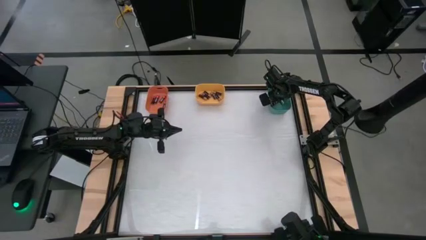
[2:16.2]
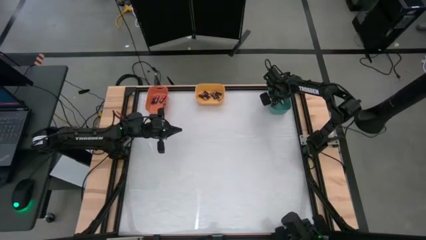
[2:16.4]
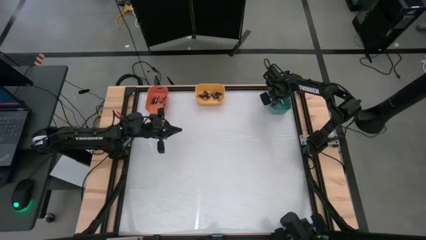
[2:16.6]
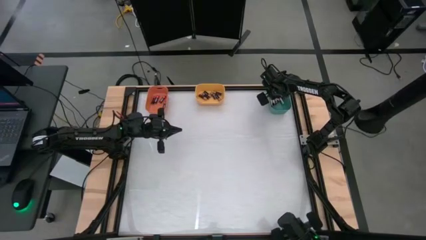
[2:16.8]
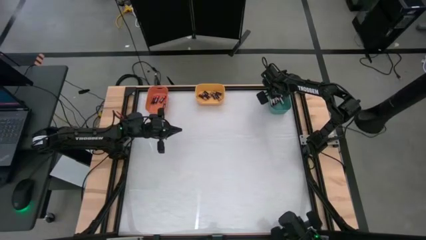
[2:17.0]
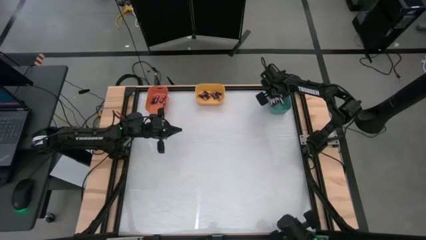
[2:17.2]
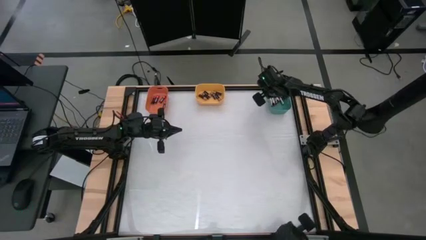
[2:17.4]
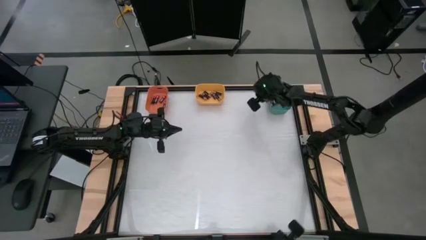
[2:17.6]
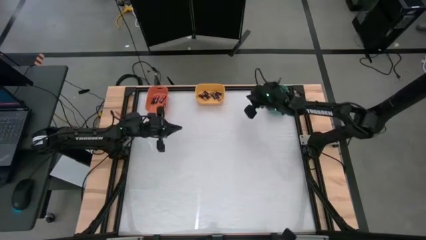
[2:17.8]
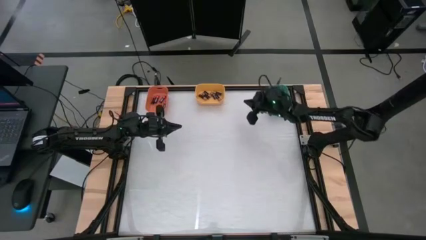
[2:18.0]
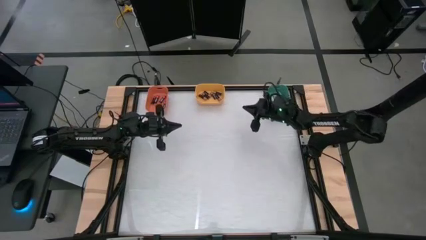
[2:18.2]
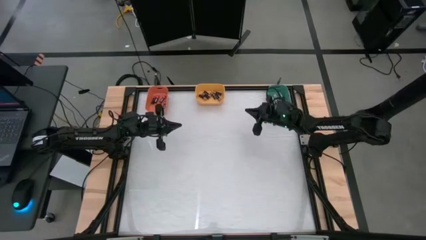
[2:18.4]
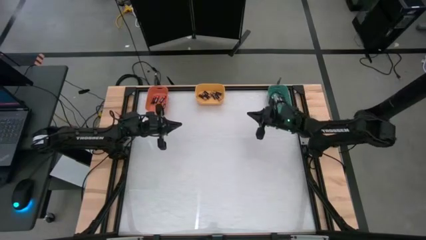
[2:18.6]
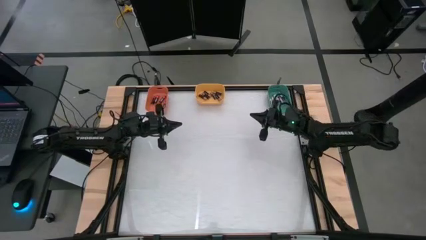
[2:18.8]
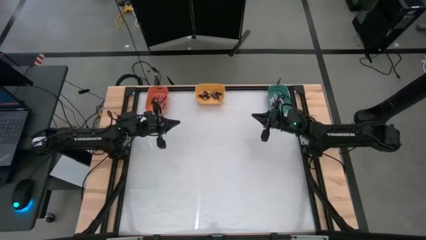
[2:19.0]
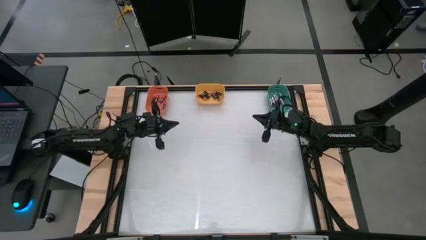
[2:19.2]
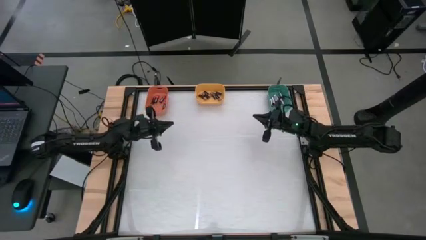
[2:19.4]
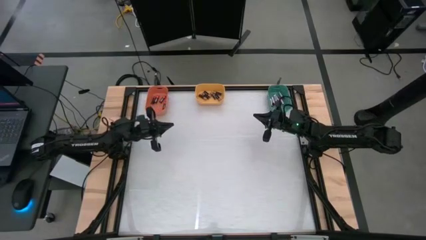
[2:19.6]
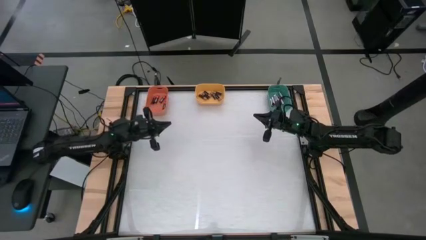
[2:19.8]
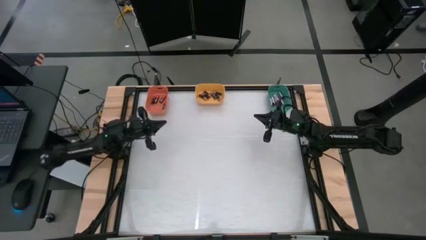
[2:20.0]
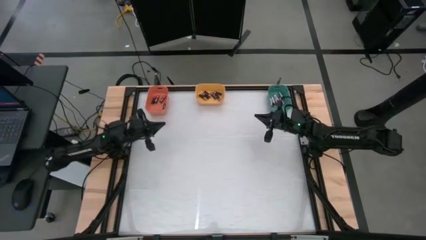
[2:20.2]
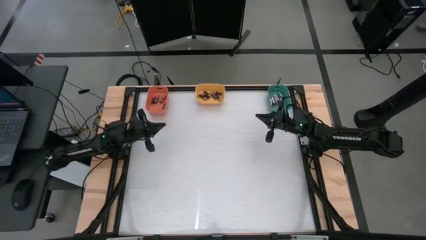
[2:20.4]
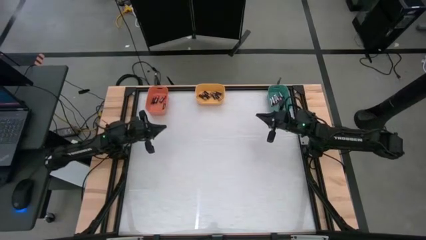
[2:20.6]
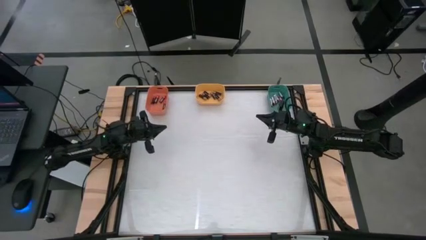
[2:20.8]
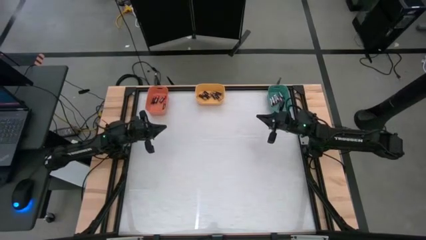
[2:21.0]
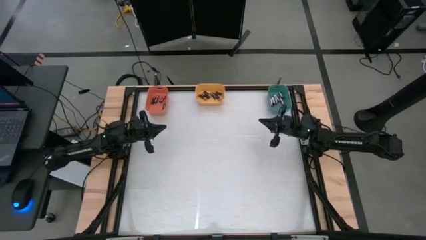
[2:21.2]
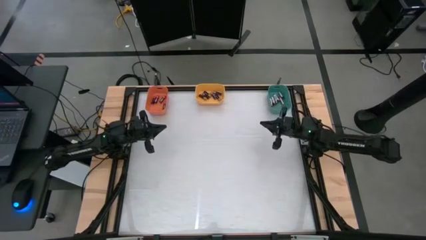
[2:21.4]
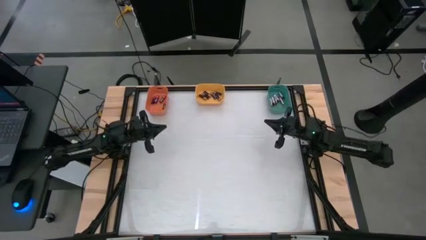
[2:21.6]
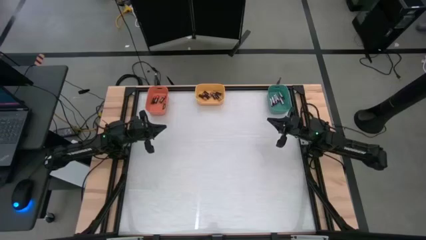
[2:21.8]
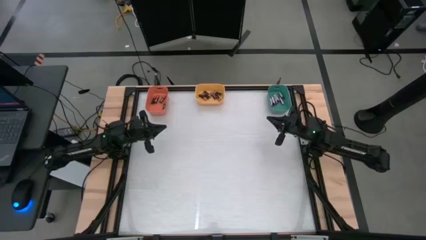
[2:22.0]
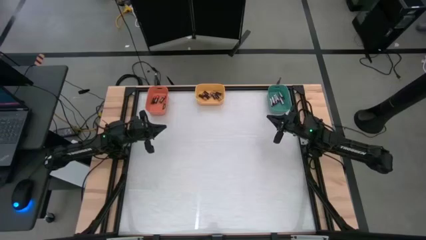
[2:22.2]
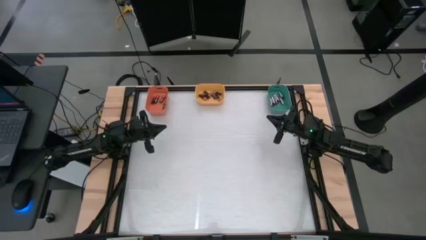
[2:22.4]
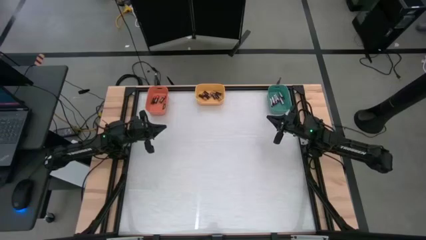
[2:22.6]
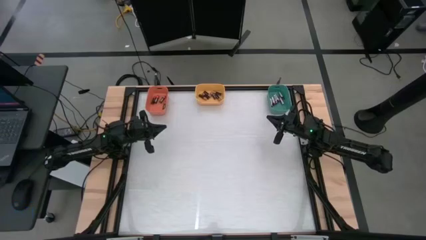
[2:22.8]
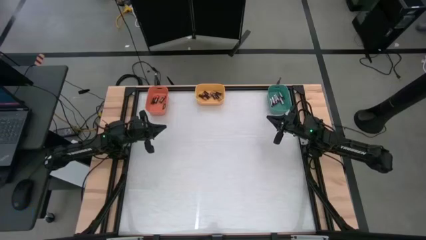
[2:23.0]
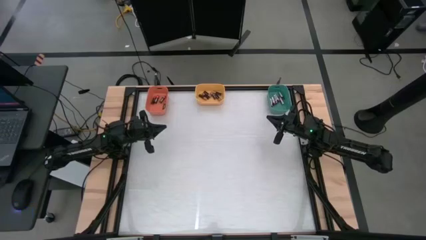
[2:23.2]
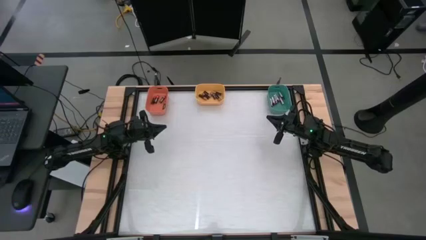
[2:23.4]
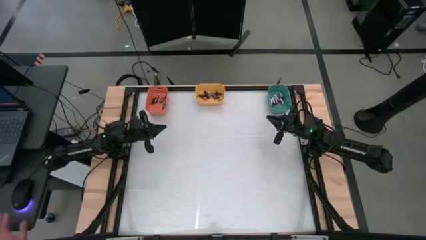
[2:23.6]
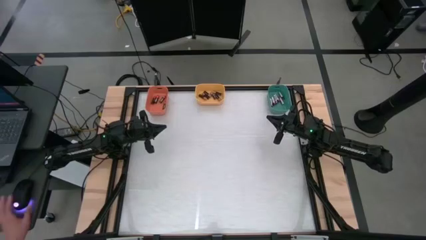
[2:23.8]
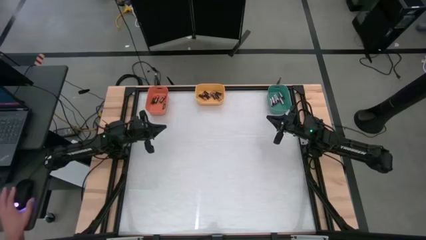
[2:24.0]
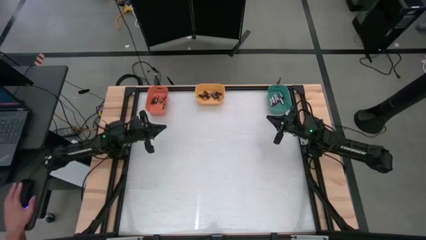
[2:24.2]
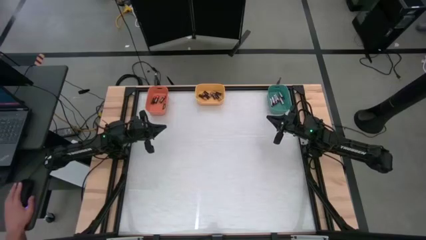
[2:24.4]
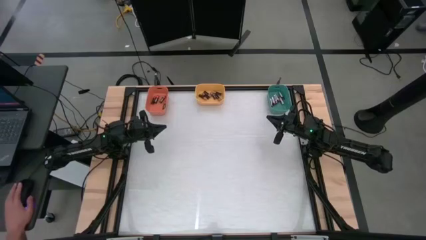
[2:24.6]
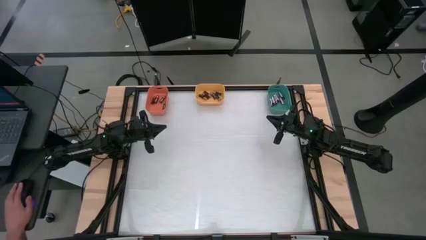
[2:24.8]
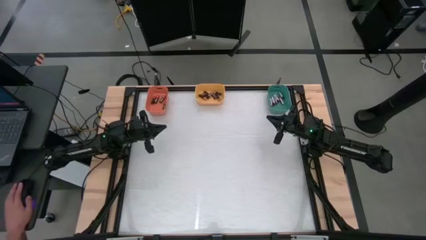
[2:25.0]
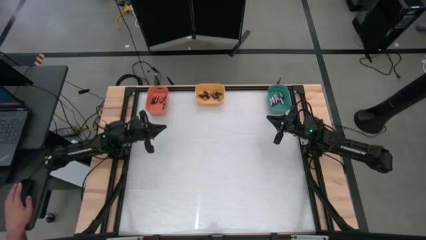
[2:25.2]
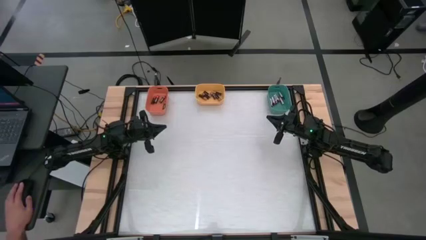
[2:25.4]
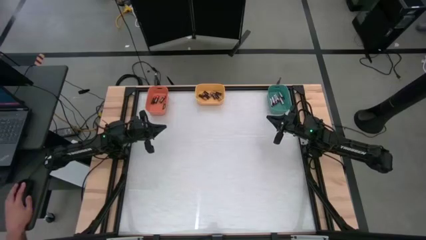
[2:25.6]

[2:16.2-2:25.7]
Task: Sort batteries
Return to Home Position

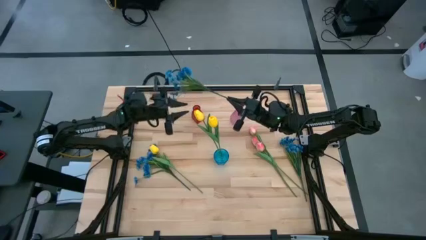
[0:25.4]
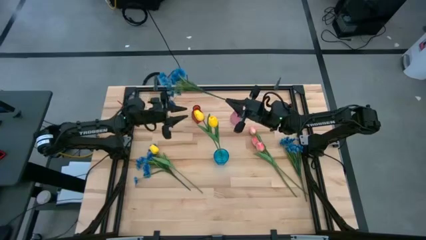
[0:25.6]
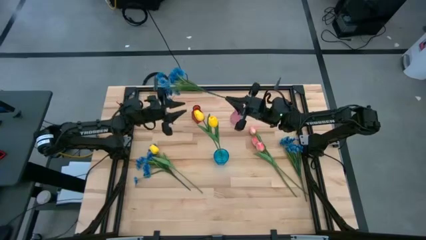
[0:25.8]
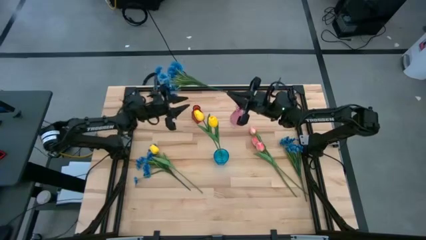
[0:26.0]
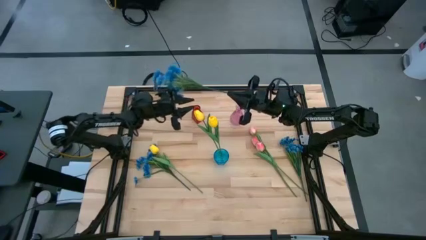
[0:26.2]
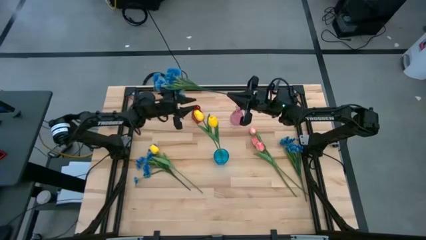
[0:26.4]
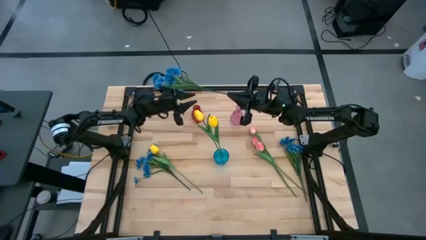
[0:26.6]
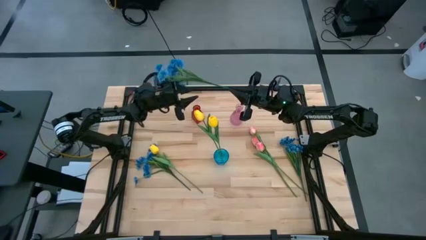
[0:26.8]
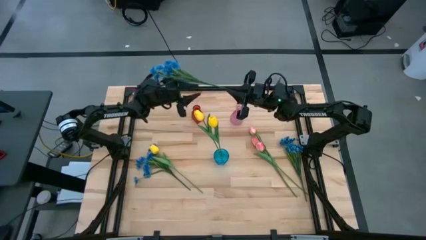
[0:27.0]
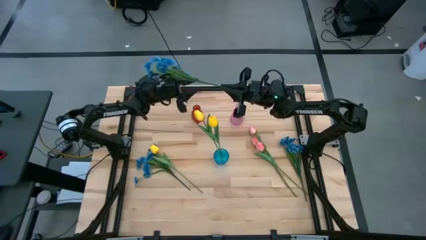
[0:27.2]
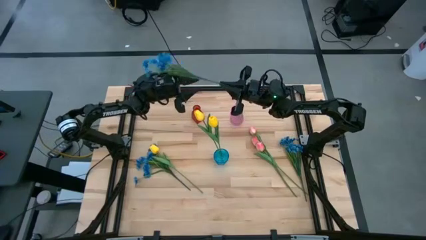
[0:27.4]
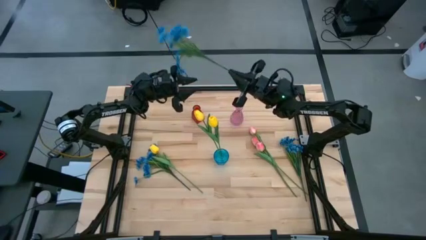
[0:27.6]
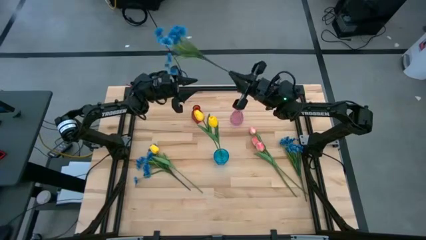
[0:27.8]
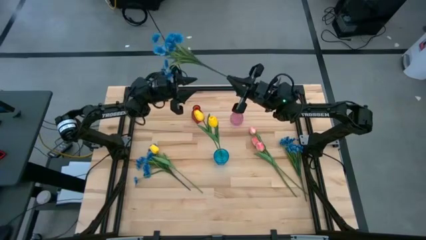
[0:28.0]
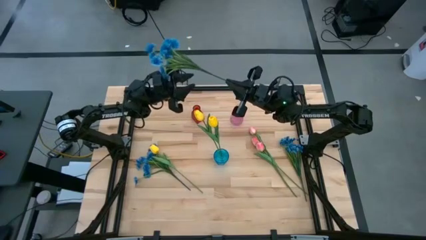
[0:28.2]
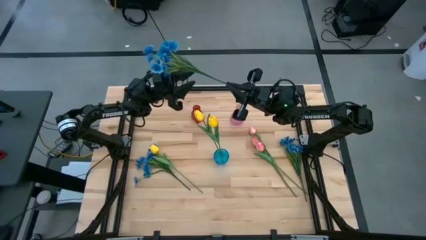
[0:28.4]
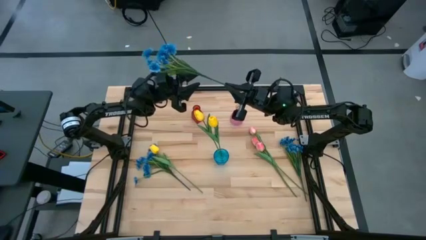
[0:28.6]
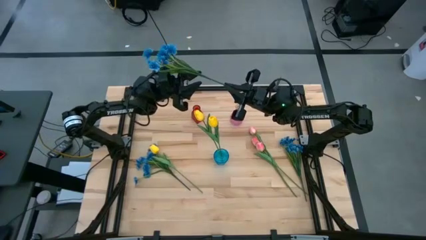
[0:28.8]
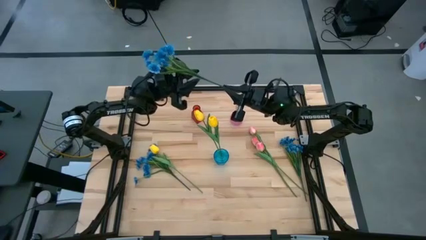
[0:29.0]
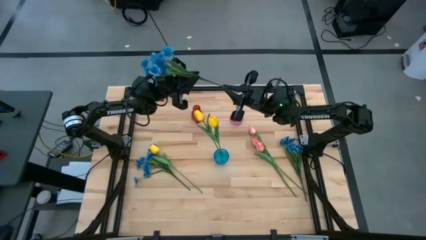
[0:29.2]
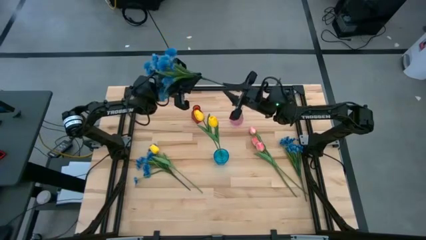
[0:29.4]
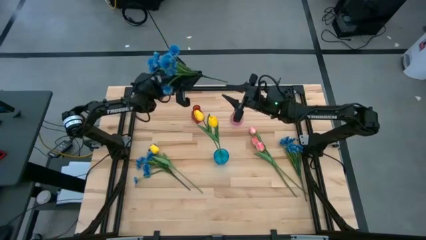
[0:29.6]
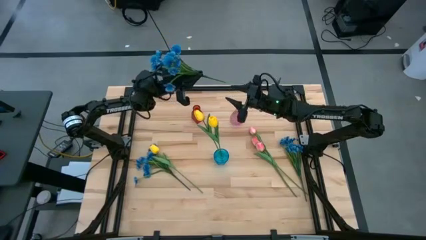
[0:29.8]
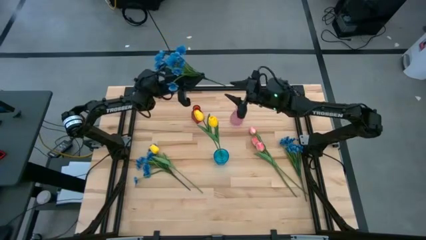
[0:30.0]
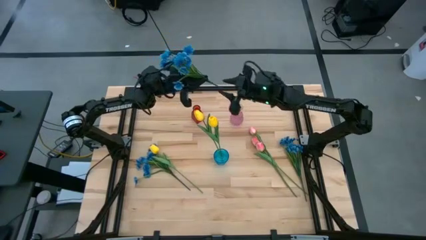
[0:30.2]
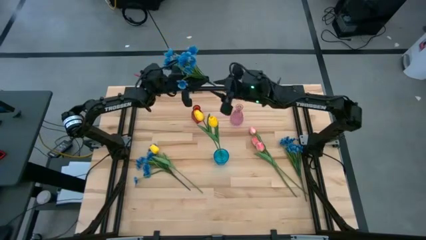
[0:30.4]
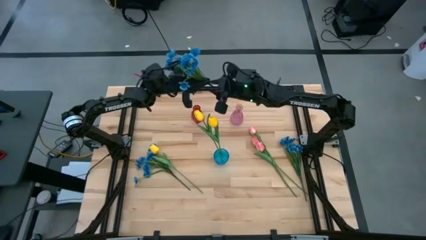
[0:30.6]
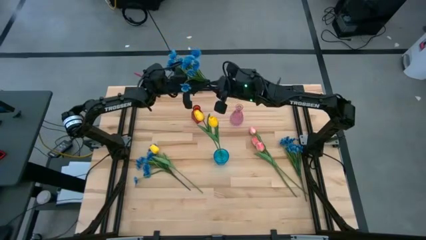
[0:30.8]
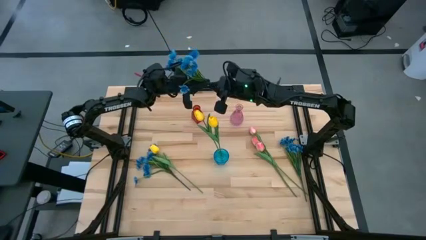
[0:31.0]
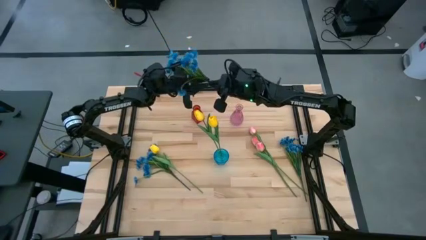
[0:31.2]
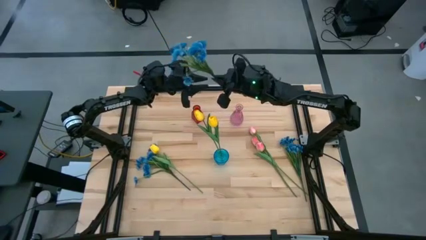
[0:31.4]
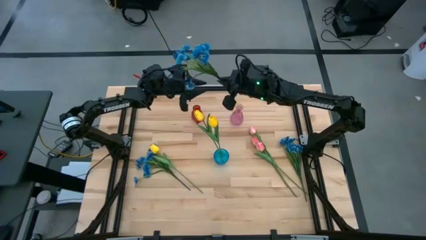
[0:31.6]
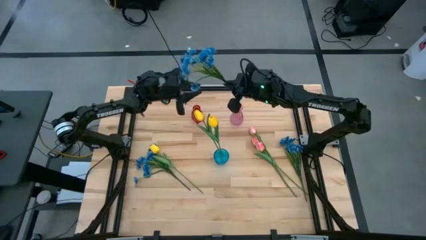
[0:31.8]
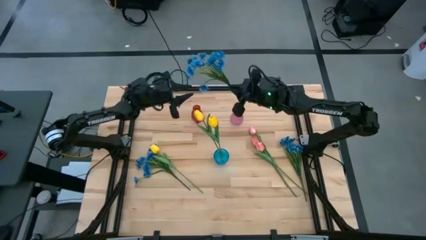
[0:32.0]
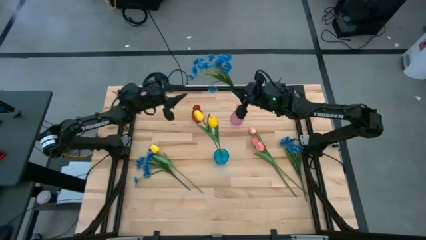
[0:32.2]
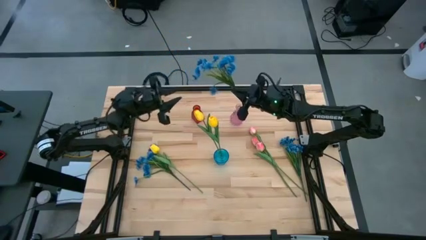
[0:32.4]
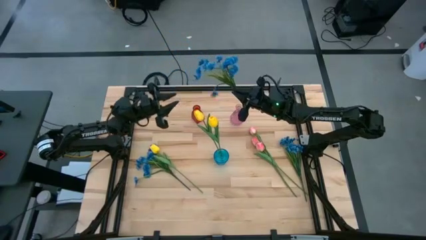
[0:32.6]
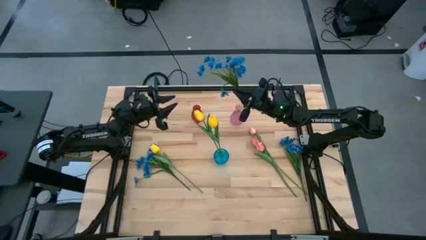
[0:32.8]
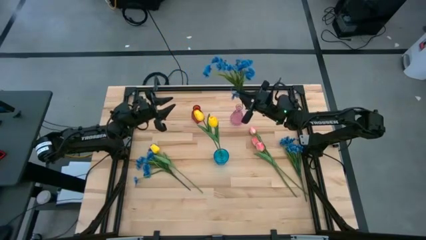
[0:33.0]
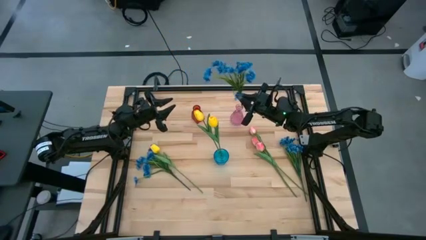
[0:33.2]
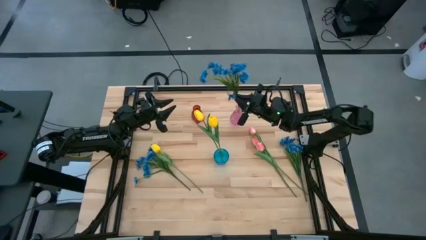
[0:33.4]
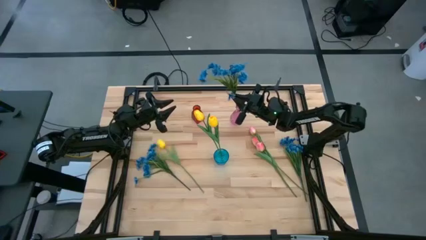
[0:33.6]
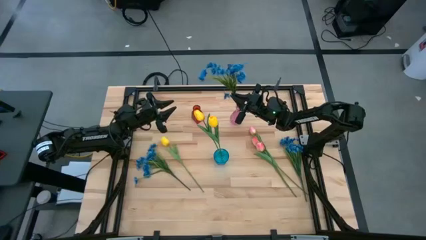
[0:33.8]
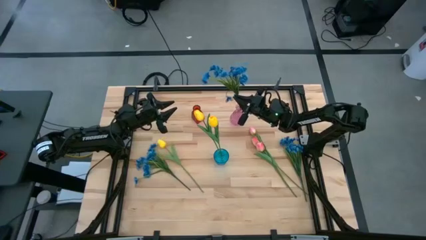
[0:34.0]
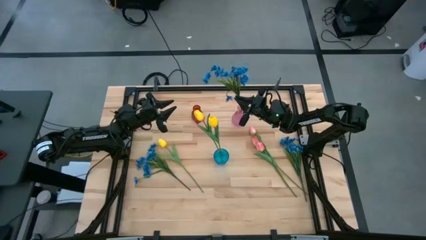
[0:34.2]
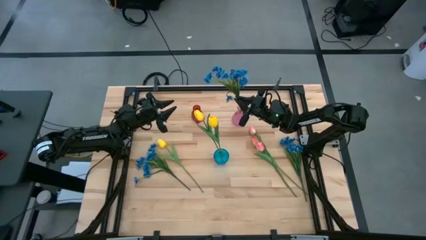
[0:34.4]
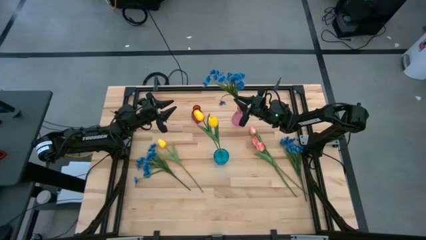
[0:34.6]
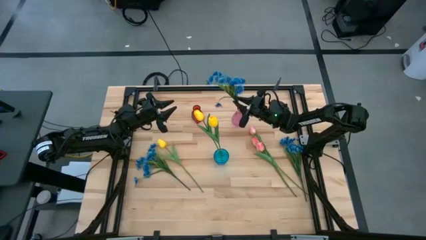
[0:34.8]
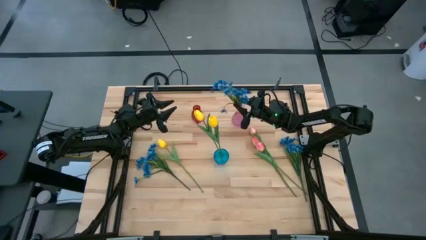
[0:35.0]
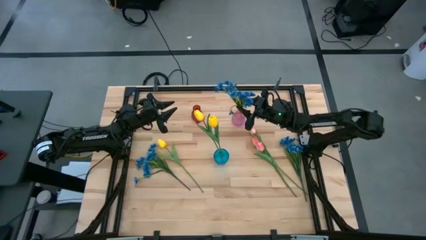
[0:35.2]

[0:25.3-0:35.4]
Task: Sort flowers into vase by color
Put the middle right blue flowers into the pink vase
